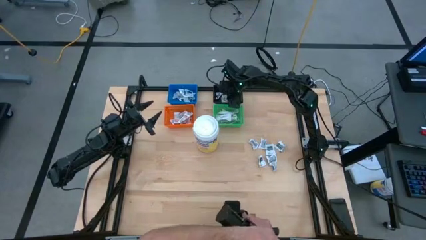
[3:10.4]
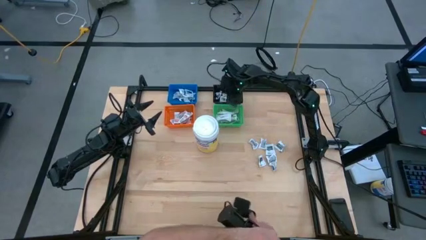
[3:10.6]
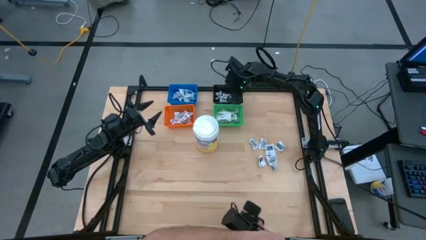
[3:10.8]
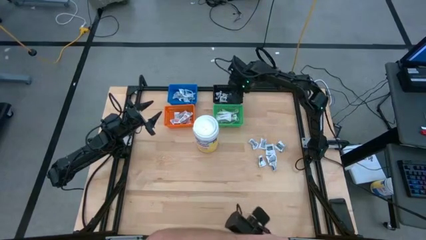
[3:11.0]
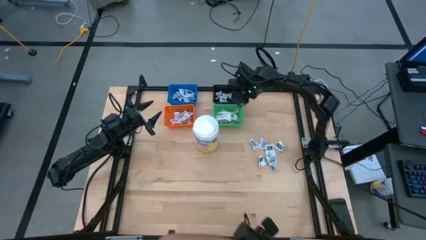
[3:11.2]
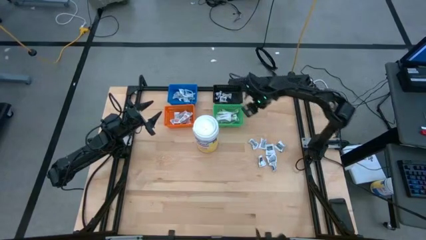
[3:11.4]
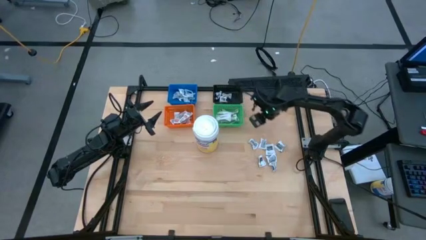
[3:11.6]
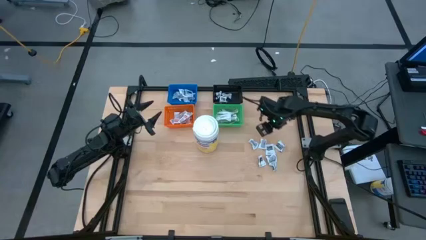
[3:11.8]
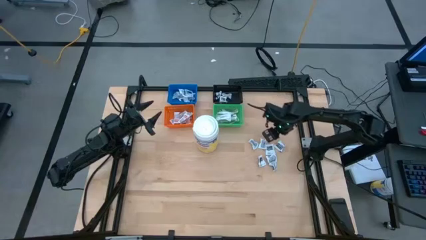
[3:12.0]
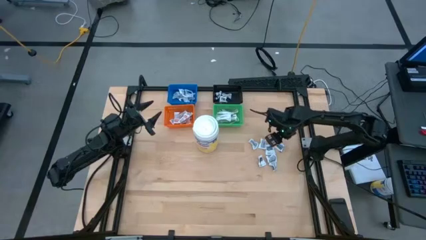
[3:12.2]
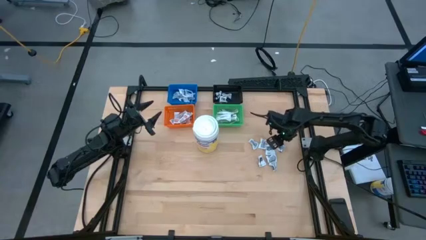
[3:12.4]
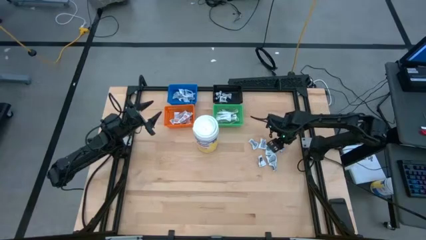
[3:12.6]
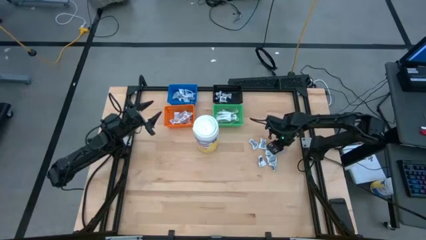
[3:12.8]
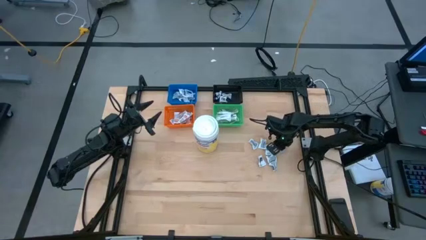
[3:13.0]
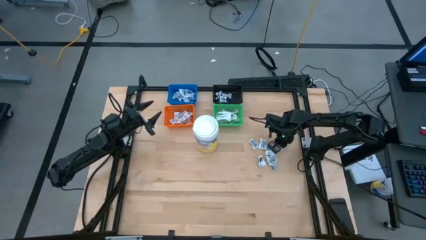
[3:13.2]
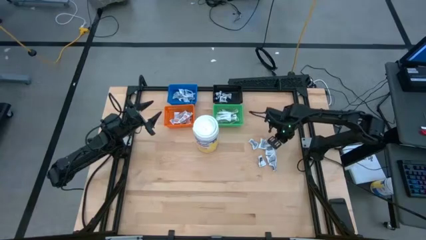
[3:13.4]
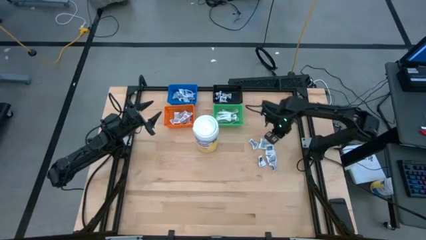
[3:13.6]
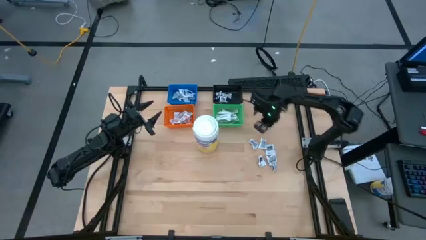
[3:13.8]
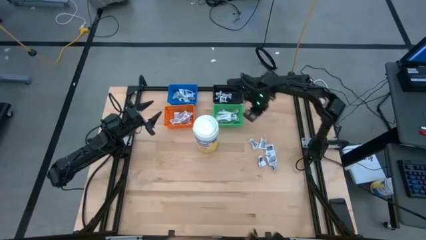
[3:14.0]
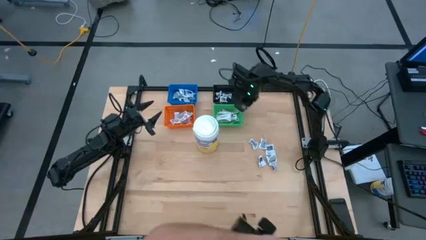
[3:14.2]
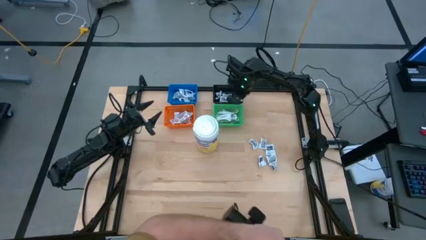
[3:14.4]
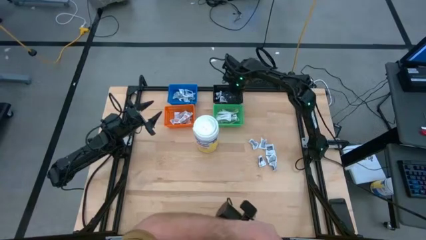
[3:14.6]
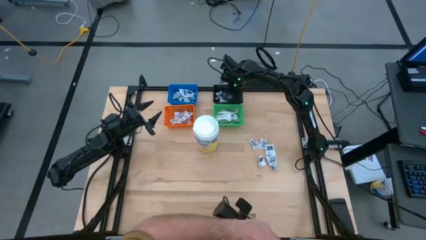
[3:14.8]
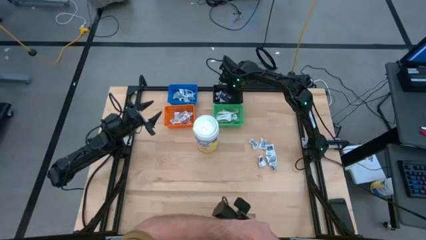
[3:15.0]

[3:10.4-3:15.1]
Task: Pick & Place First Aid Supplies
Put the black towelette pack into the black bin

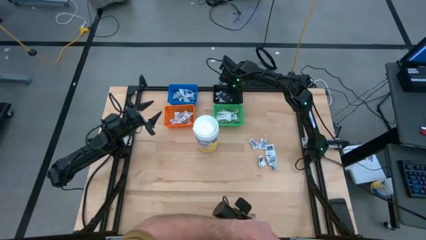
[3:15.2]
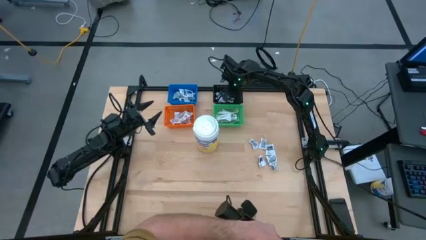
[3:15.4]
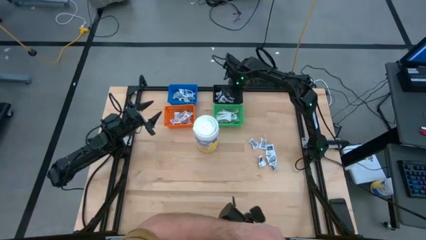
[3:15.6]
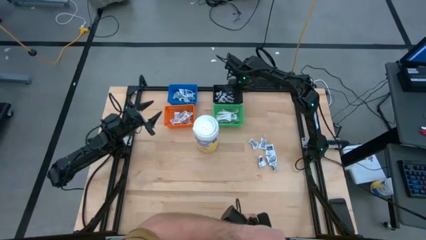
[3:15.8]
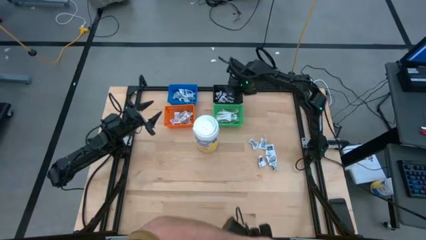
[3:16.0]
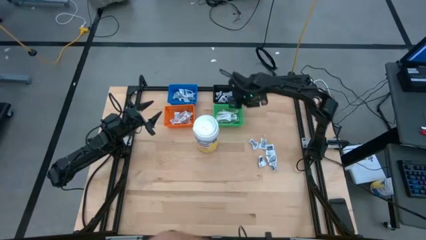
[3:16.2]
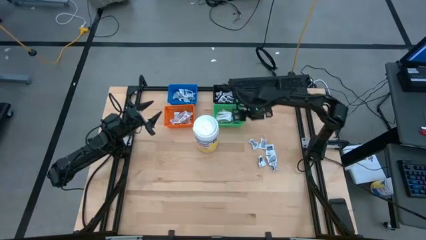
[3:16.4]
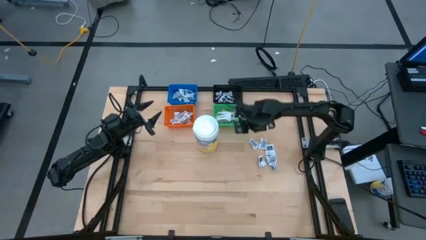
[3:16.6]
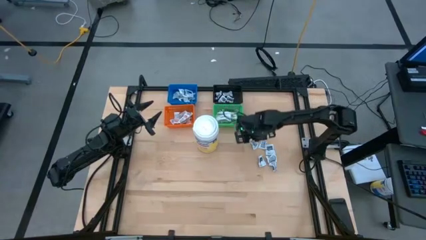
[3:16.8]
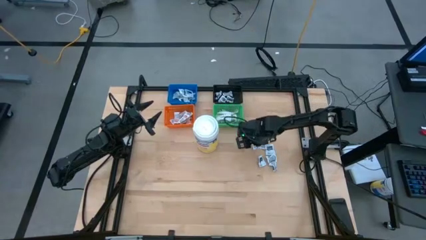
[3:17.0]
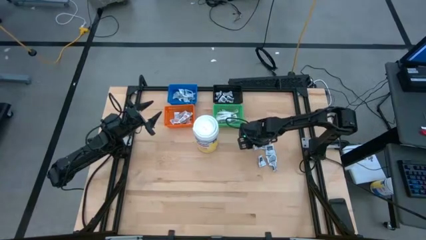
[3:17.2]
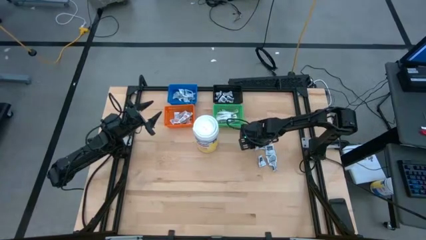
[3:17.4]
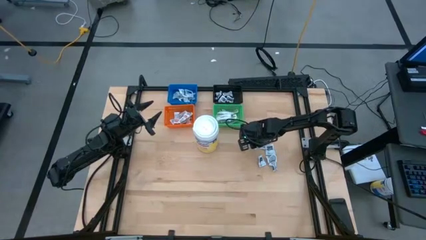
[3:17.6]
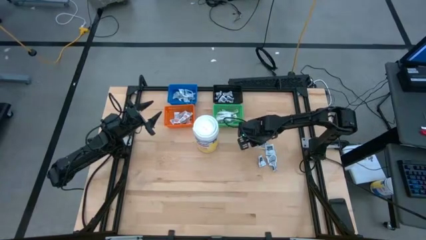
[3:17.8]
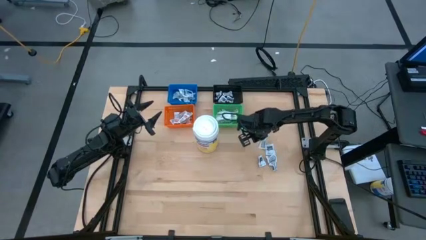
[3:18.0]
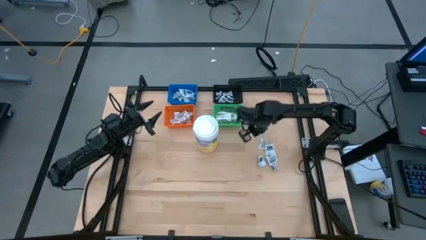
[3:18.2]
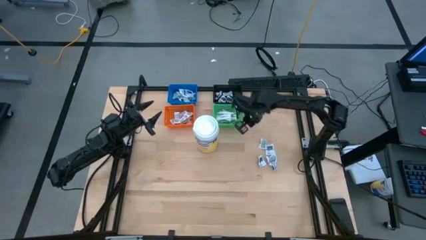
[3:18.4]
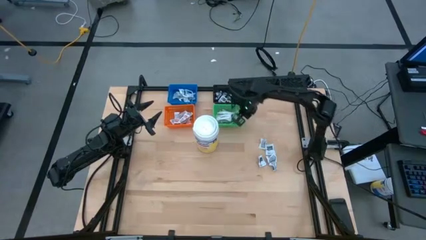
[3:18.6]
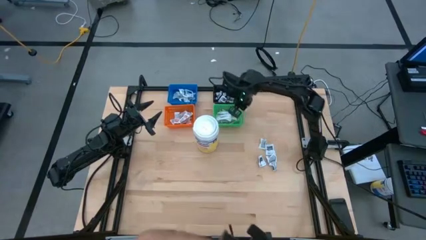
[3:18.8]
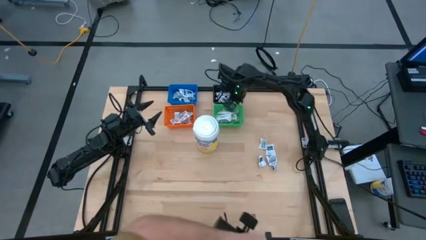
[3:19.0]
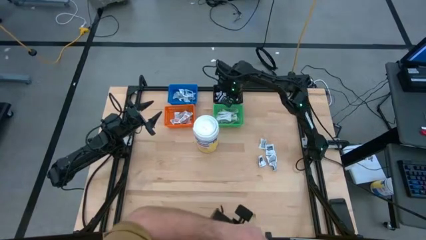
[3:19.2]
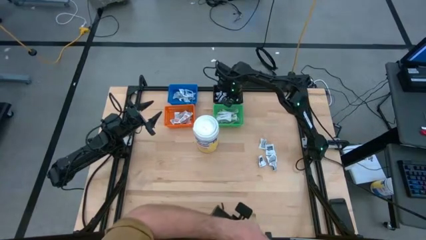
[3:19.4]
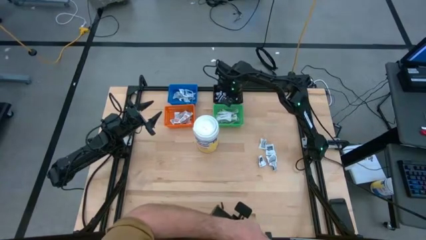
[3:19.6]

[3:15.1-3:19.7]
Put the black towelette pack into the black bin

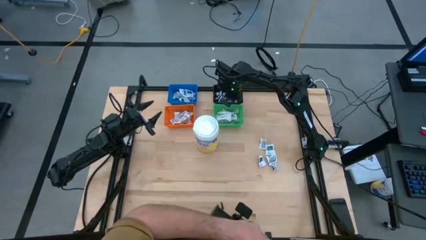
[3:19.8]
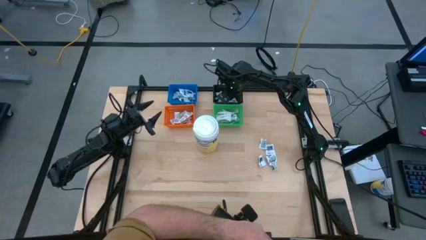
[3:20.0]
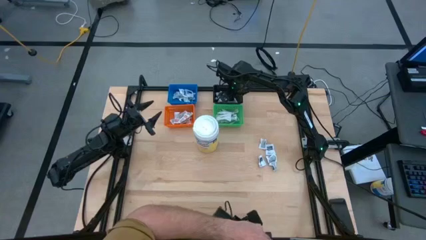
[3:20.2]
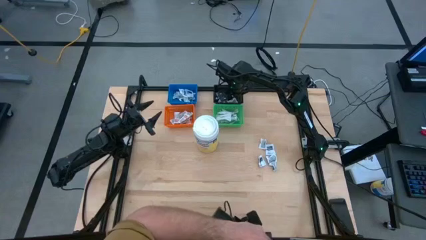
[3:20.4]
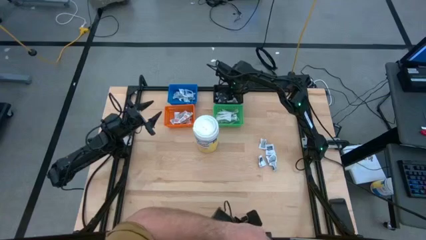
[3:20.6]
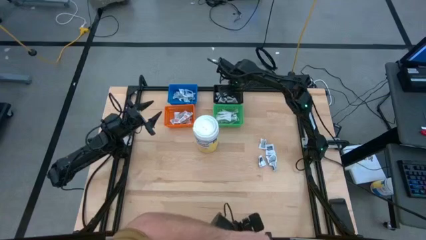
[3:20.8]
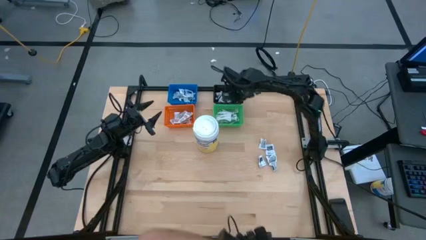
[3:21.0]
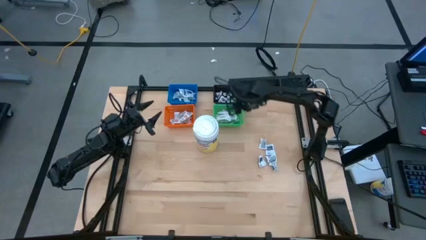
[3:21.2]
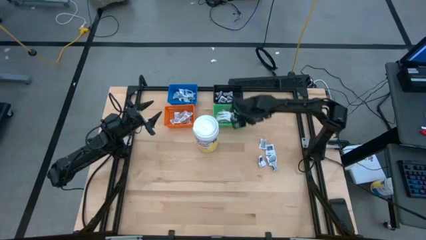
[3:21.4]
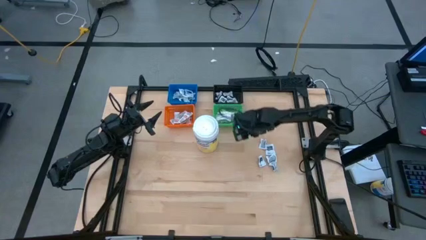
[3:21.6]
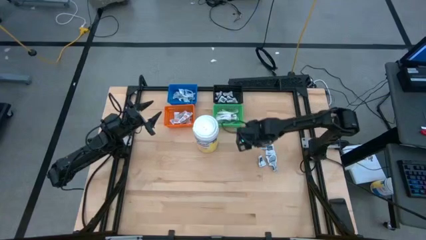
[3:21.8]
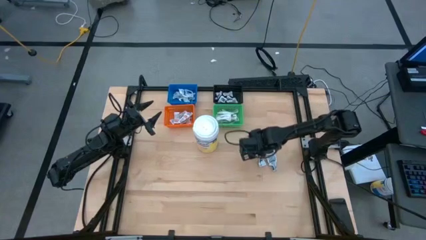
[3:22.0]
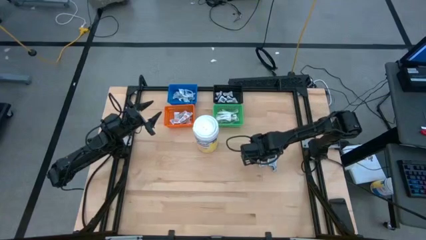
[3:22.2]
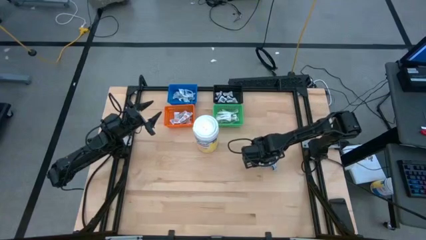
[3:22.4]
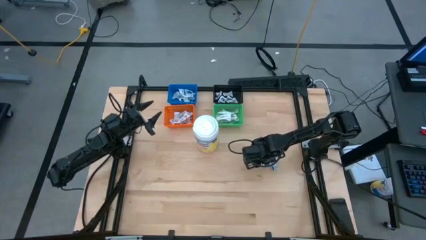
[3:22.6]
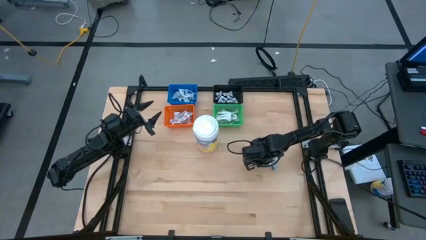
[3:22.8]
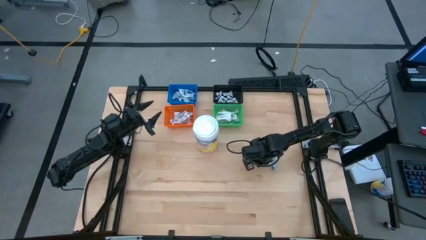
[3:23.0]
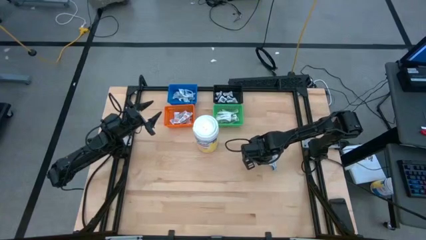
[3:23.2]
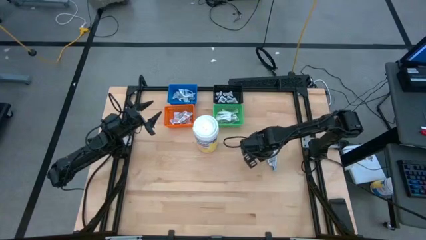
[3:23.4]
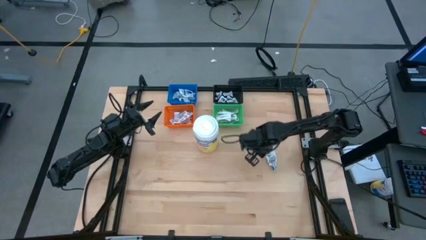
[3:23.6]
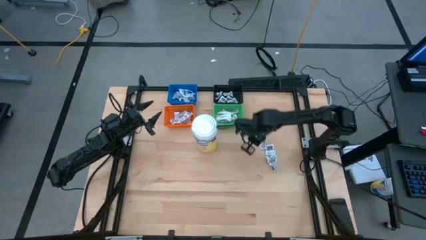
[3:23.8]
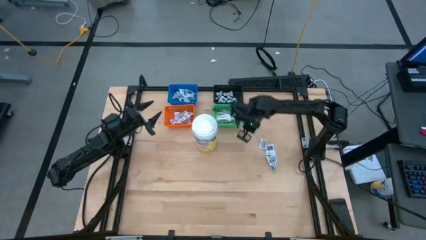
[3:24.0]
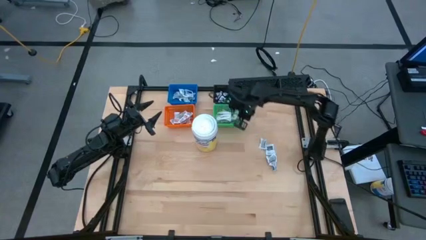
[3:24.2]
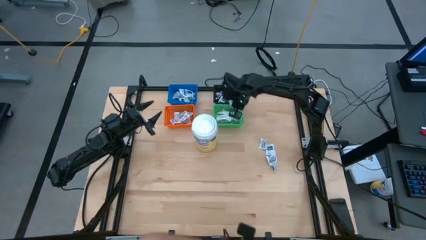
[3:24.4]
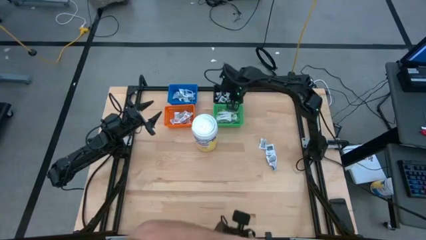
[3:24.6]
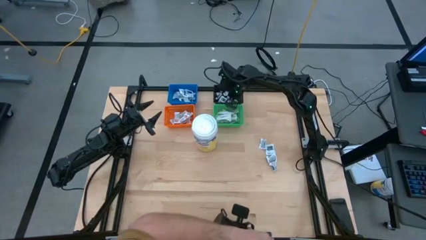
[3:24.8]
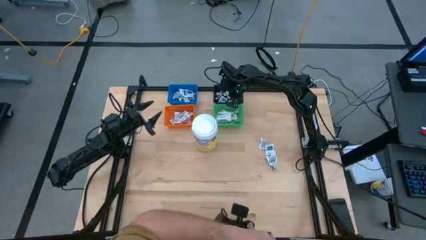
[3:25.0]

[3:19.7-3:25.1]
Put the black towelette pack into the black bin

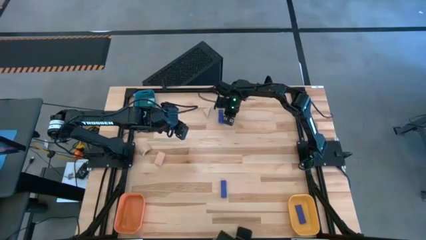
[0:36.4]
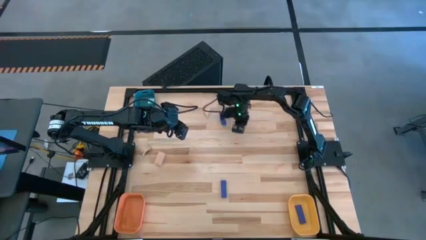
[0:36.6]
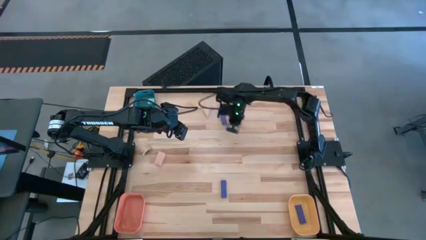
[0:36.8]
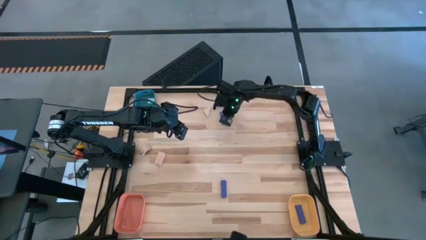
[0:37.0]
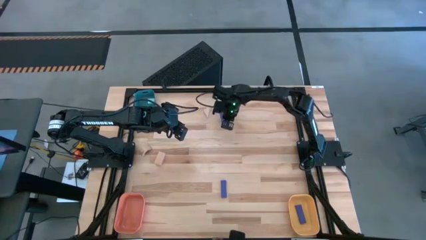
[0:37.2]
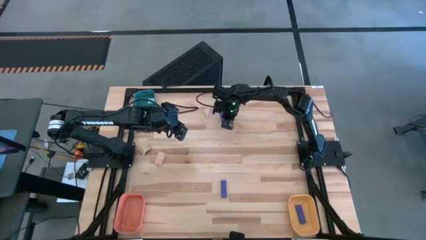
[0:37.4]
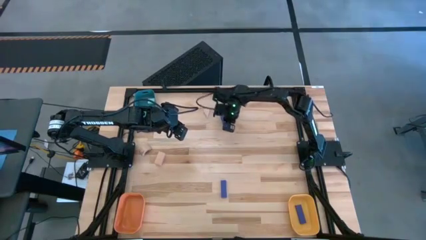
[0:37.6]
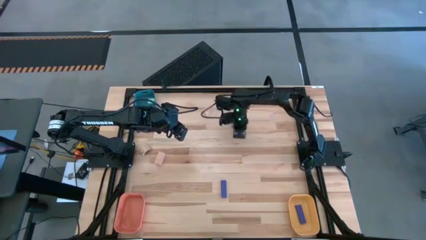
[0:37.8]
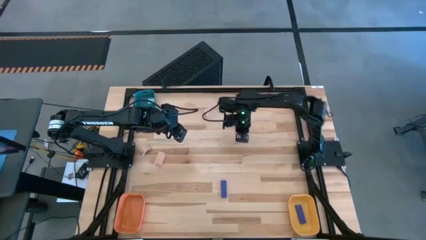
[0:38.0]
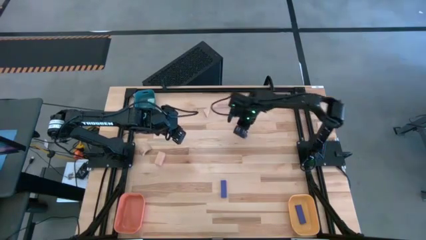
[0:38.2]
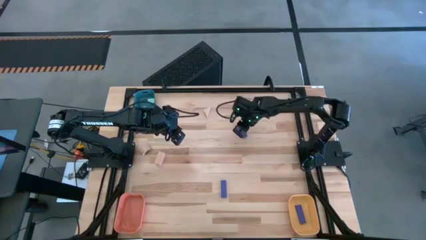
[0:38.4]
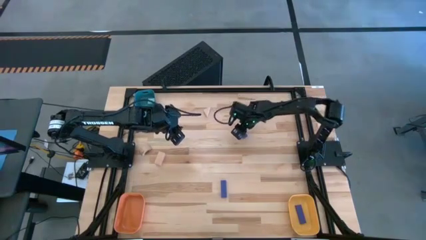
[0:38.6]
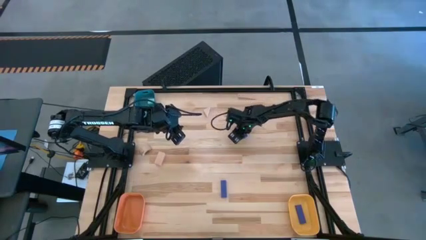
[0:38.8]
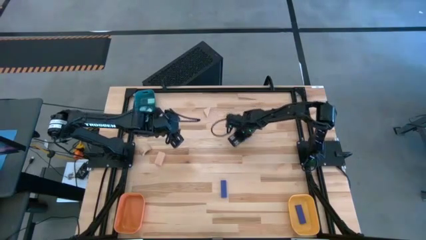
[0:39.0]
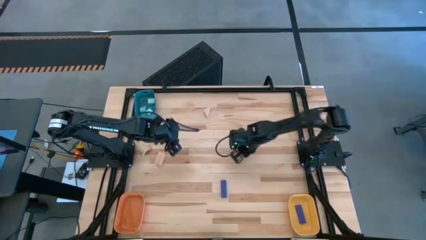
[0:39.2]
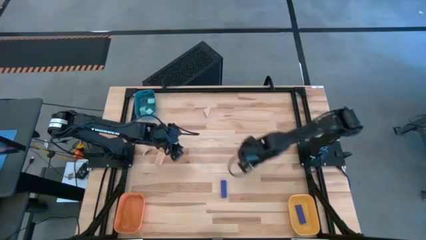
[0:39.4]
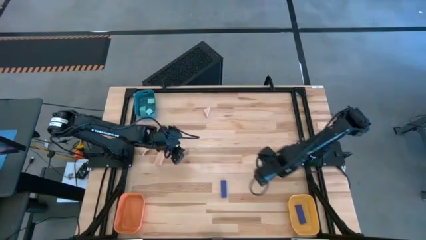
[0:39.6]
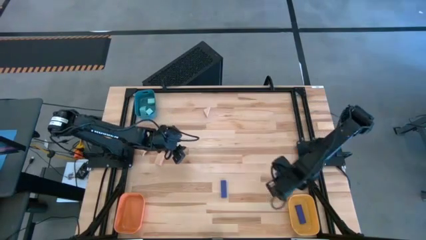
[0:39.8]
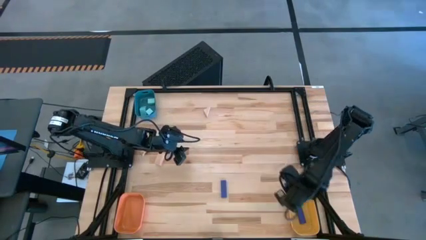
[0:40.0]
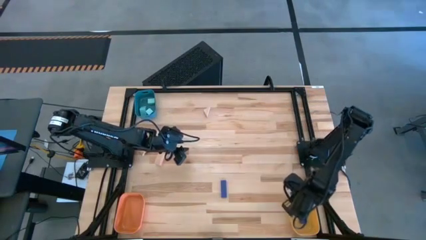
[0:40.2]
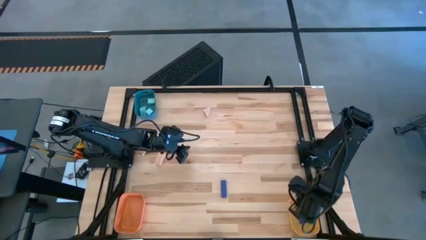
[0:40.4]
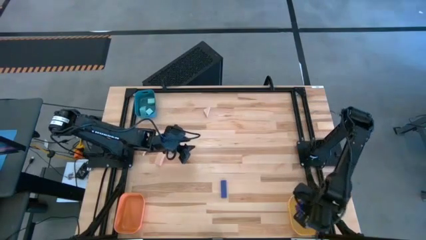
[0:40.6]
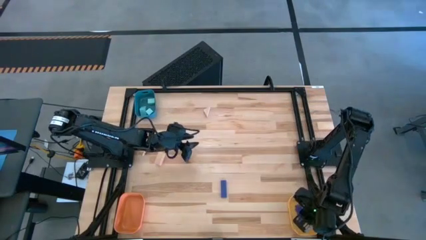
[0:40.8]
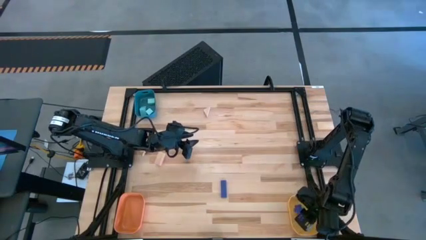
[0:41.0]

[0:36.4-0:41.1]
Task: Sort & place blocks by color
Put the top blue block into the yellow bin
